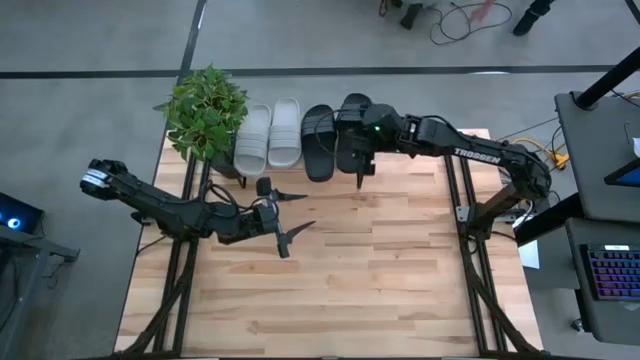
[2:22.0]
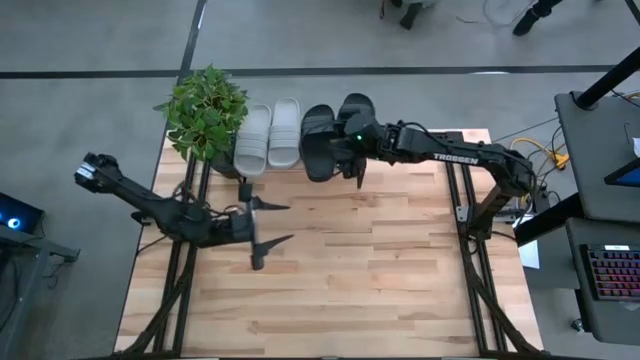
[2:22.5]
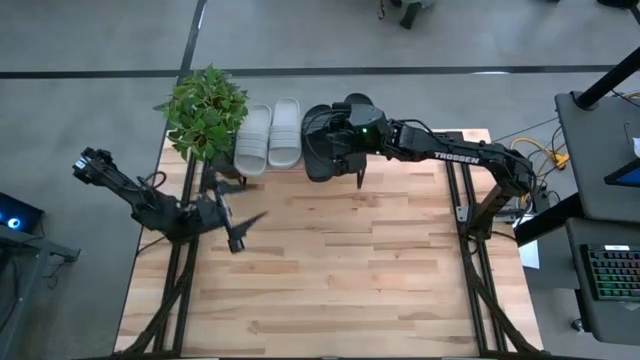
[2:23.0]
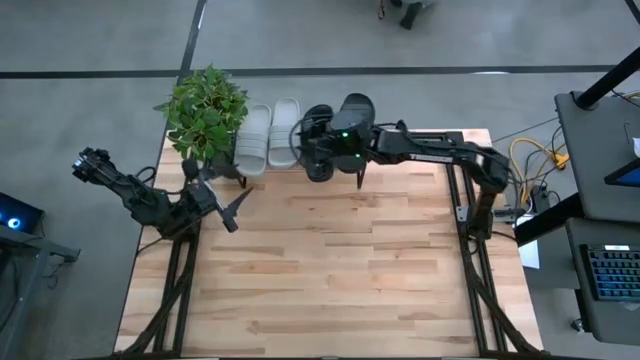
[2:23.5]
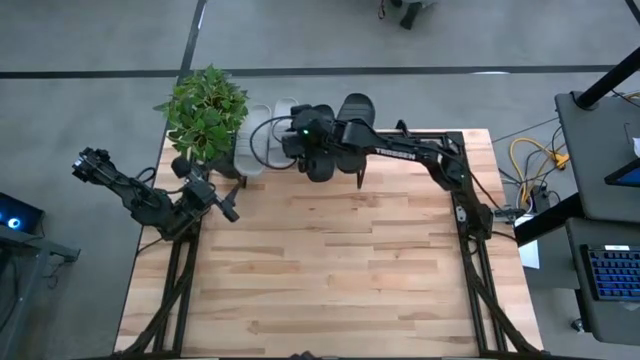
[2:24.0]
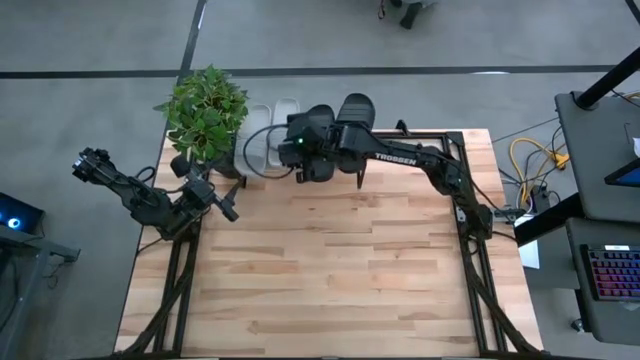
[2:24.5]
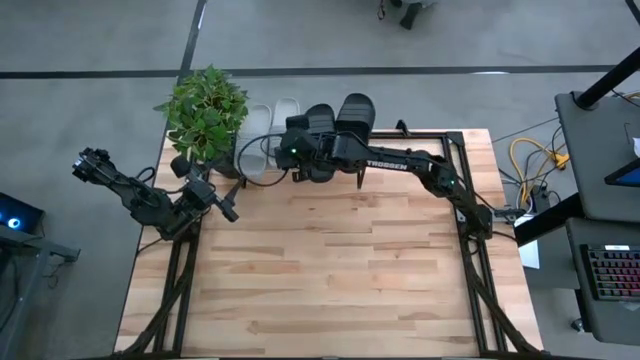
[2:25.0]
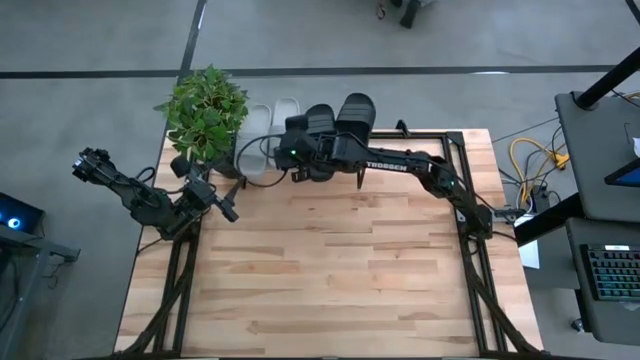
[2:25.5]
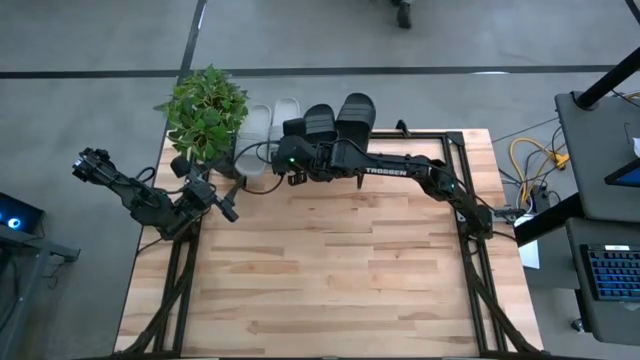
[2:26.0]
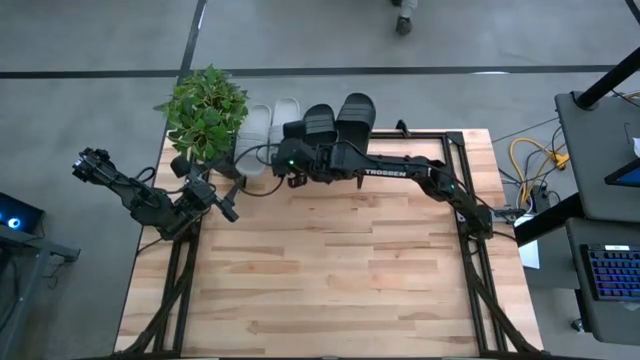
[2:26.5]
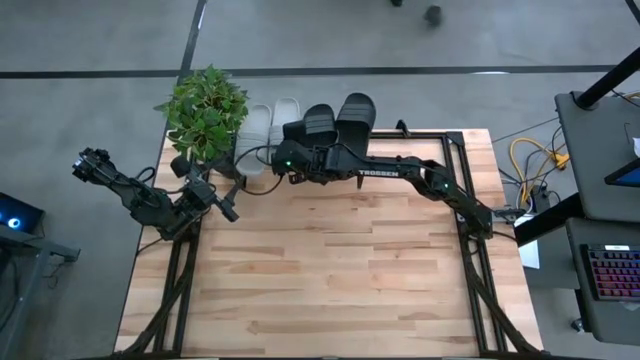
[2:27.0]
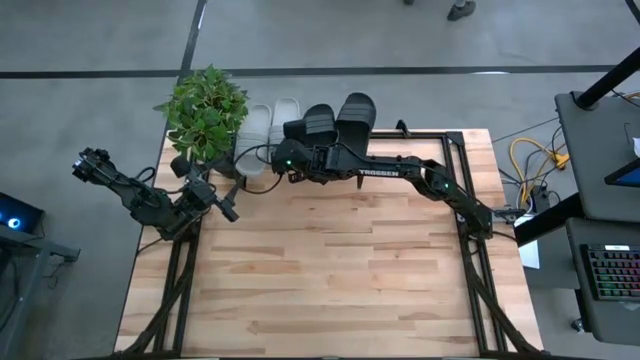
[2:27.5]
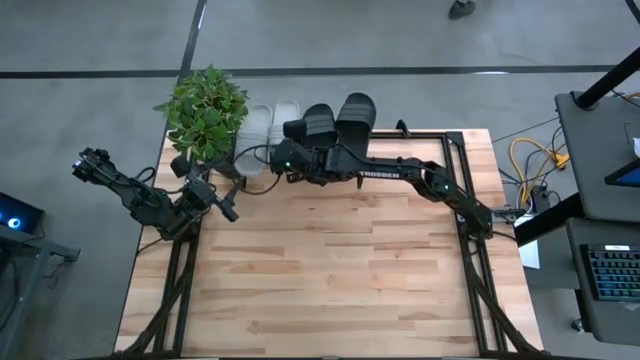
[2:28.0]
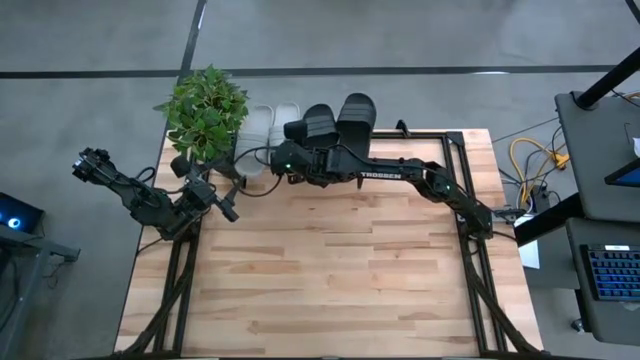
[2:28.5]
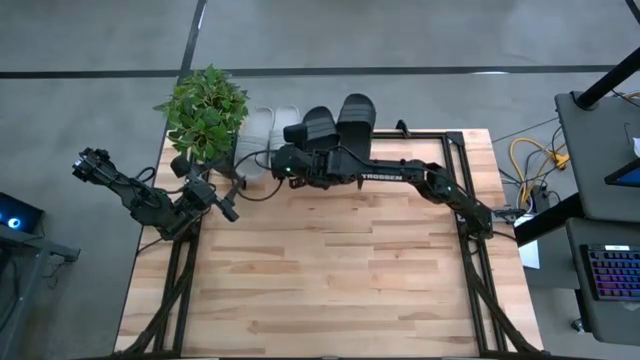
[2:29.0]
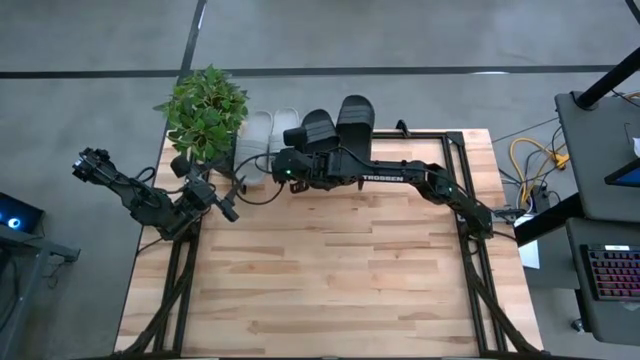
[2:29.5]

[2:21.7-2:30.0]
Task: Pick and place slides into the shelf
Adjust the right gray slipper on the shelf

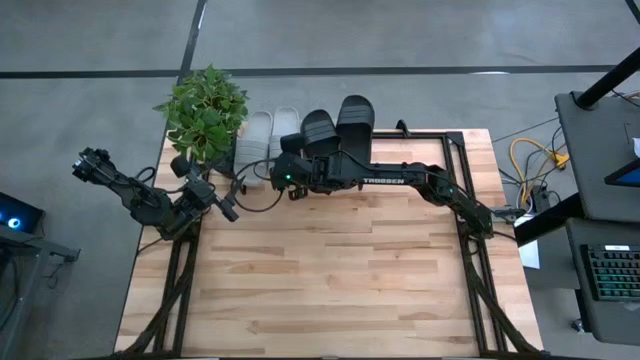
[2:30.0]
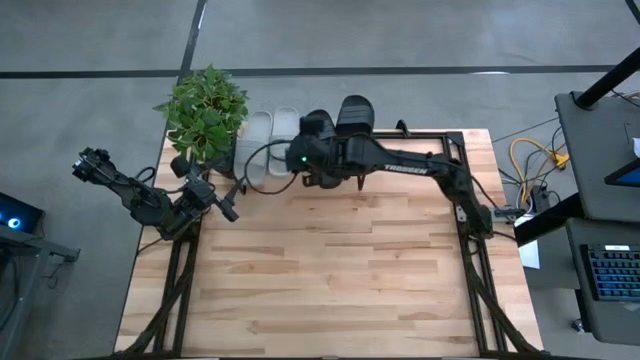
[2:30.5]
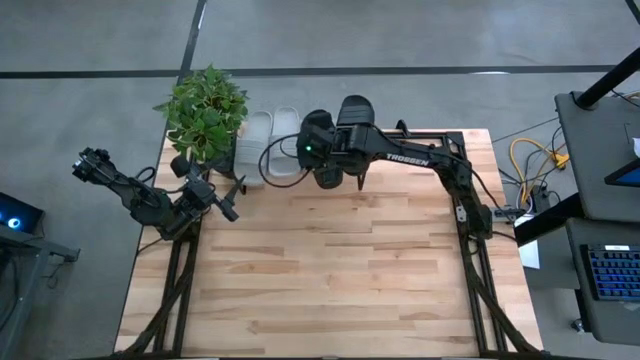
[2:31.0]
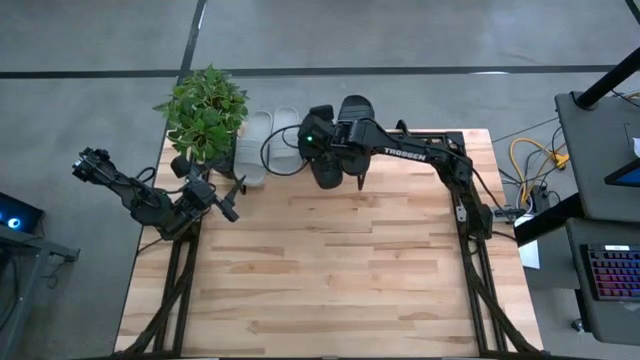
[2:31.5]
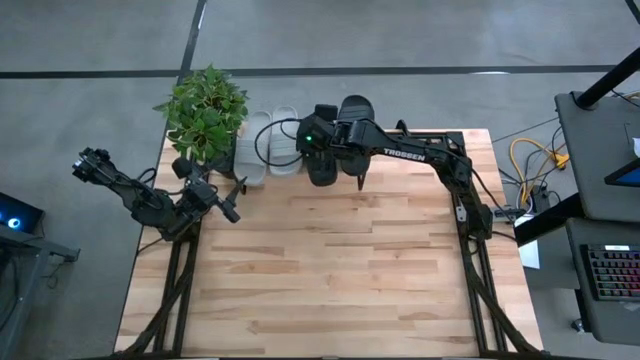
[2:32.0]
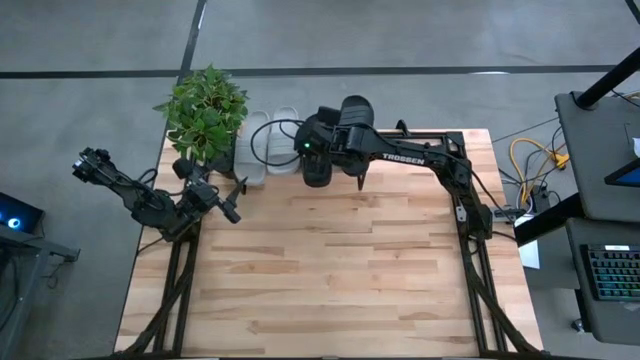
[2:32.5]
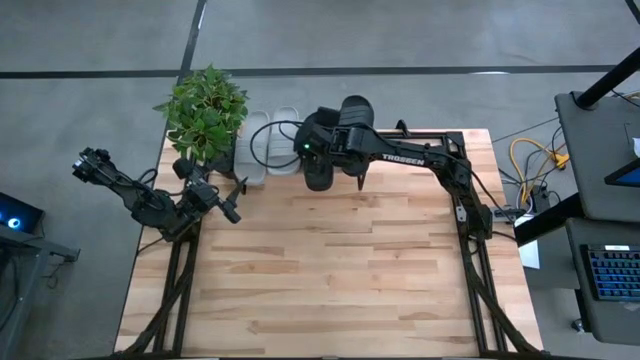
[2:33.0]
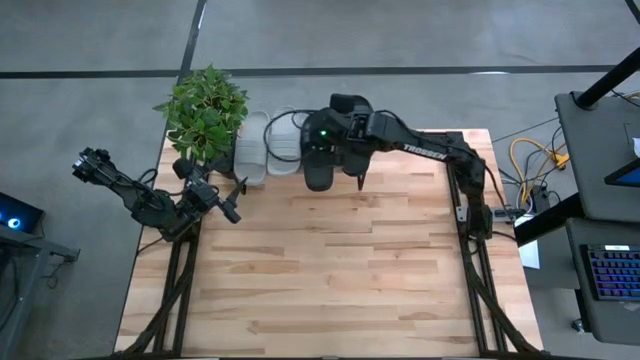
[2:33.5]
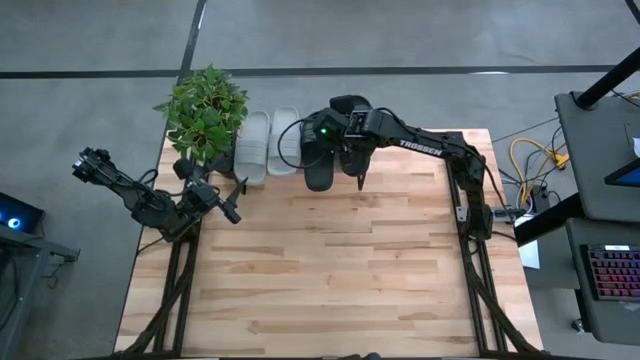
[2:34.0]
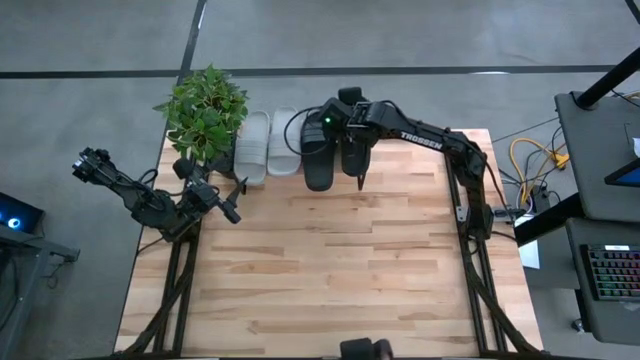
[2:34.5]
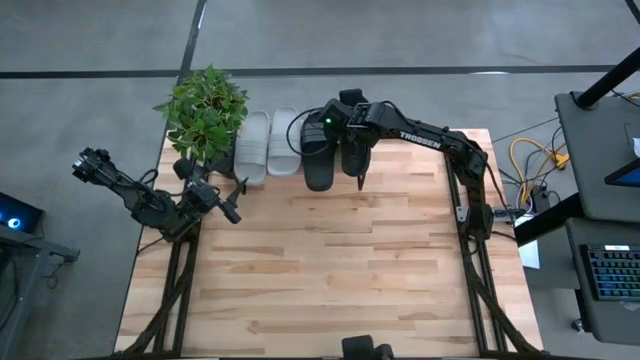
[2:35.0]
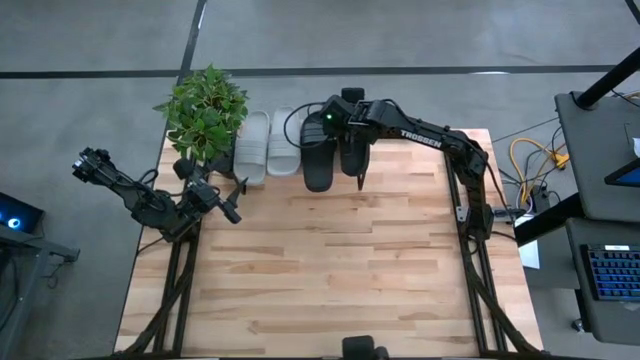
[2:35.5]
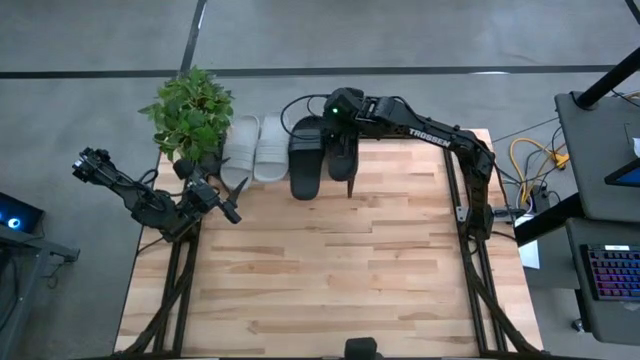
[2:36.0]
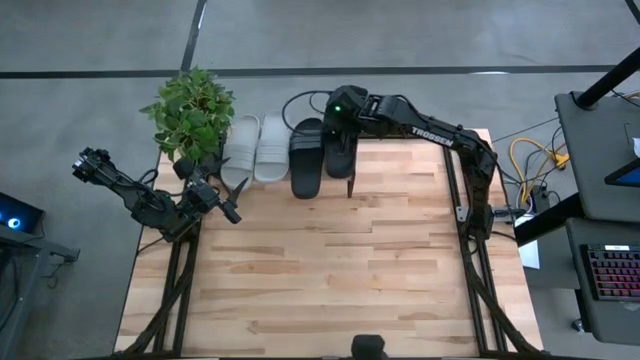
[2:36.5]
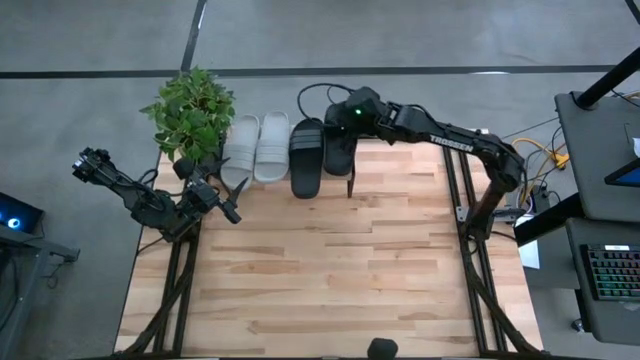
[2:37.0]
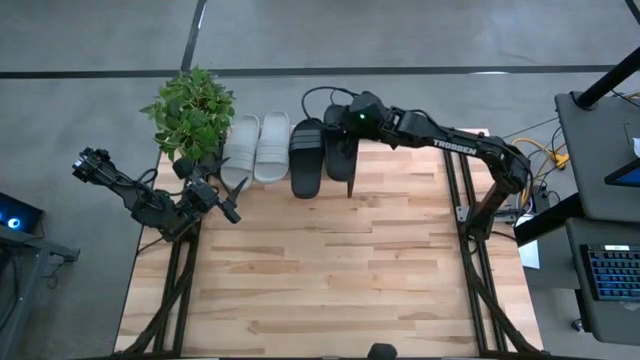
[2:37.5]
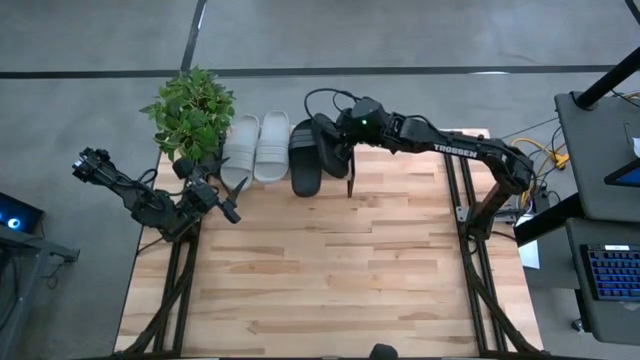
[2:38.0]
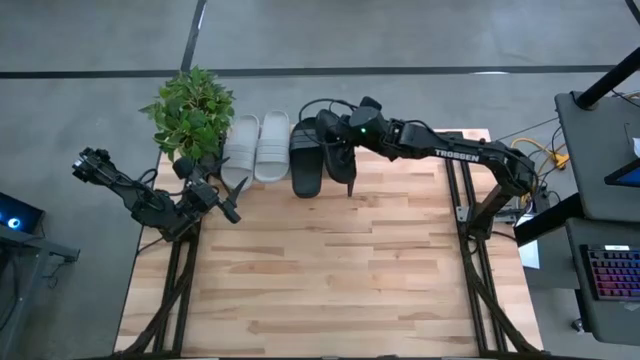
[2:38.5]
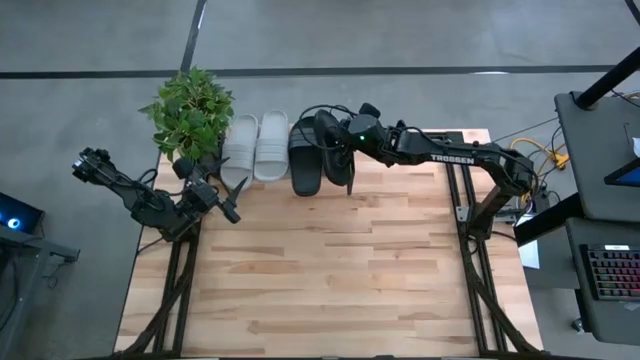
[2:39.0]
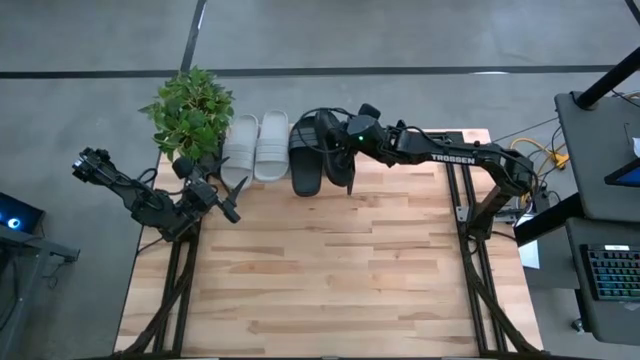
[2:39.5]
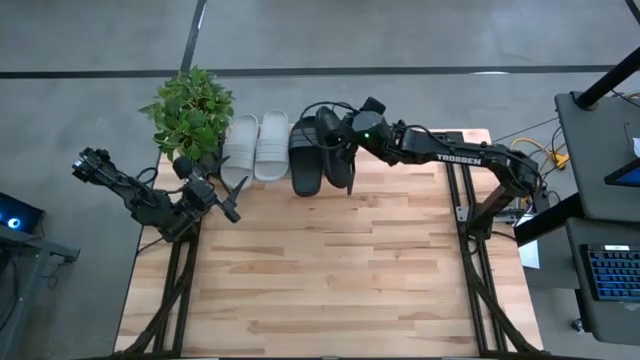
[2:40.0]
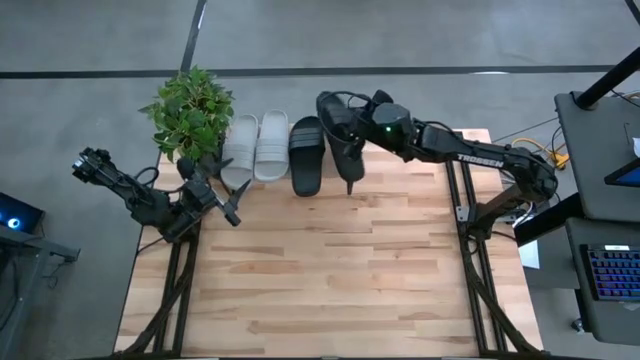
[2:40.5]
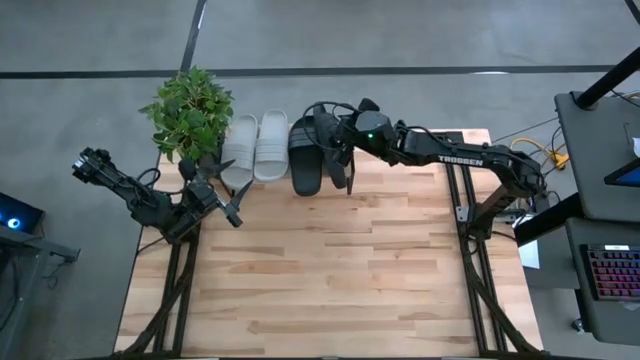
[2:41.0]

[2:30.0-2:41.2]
Adjust the pair of black slippers on the shelf
